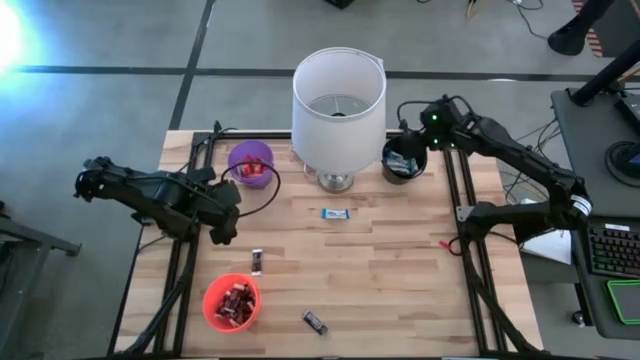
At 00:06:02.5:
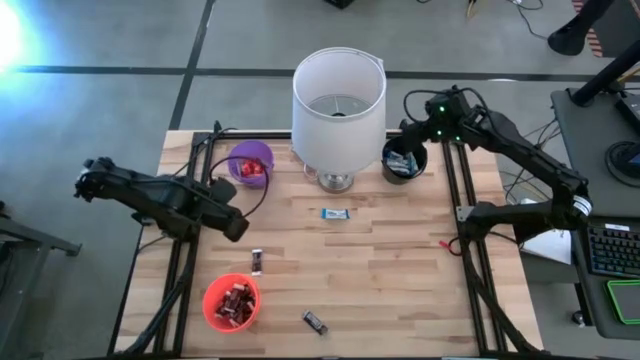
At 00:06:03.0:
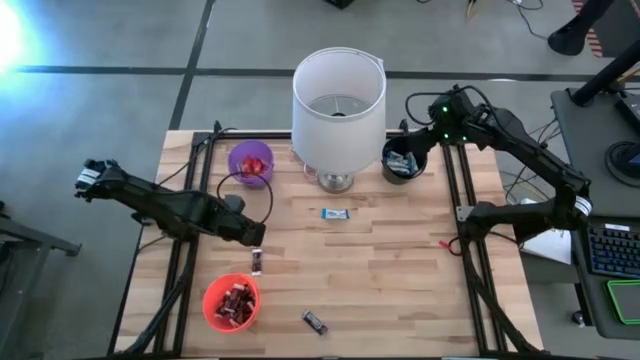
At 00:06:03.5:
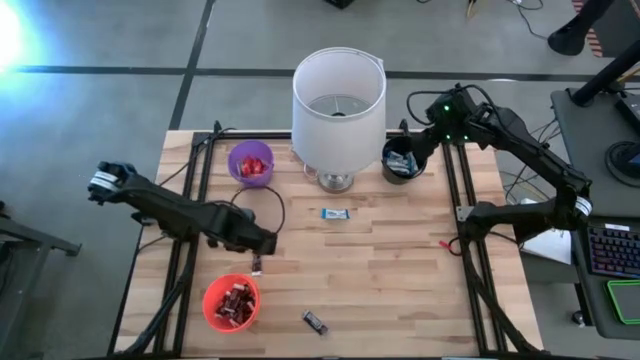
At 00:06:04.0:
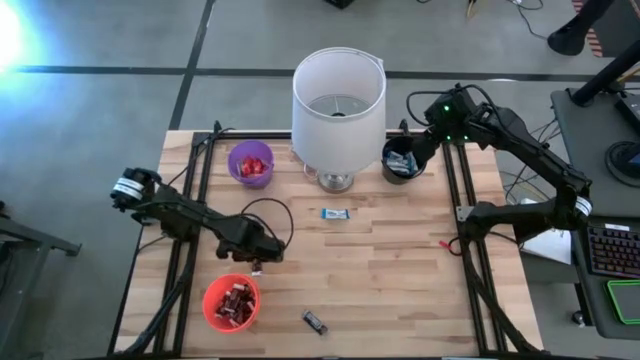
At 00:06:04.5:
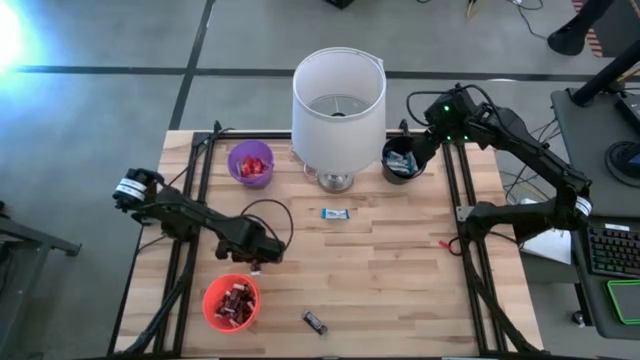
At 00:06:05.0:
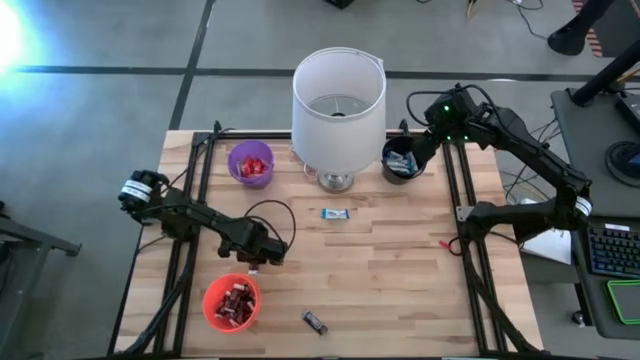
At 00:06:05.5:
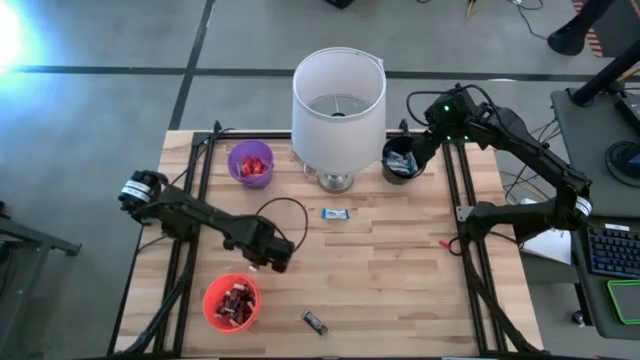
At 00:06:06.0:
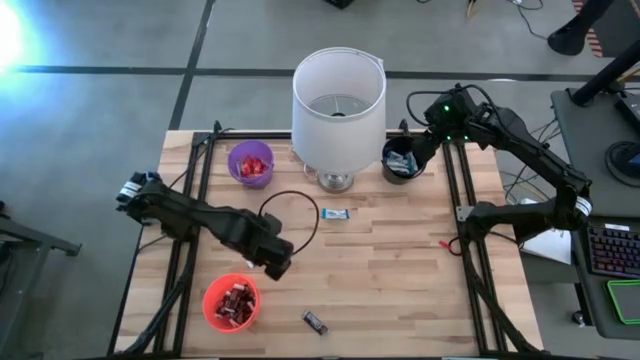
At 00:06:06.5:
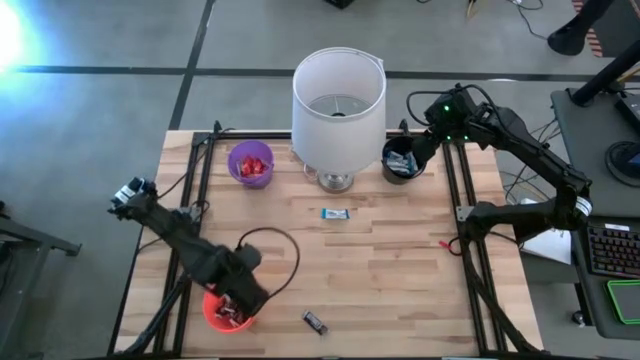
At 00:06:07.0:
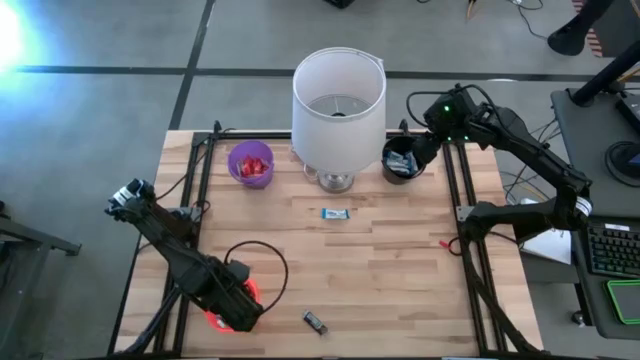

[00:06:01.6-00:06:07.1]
Task: Sort candy
Put the black chocolate into the orange bucket

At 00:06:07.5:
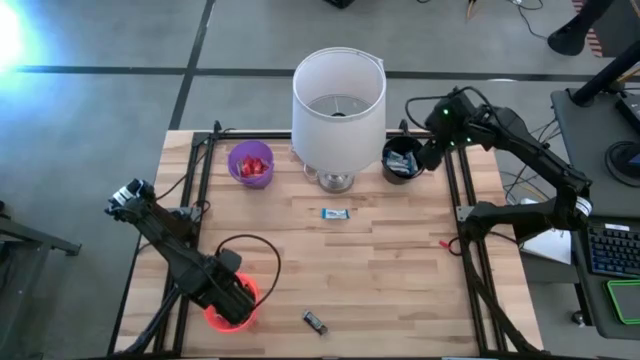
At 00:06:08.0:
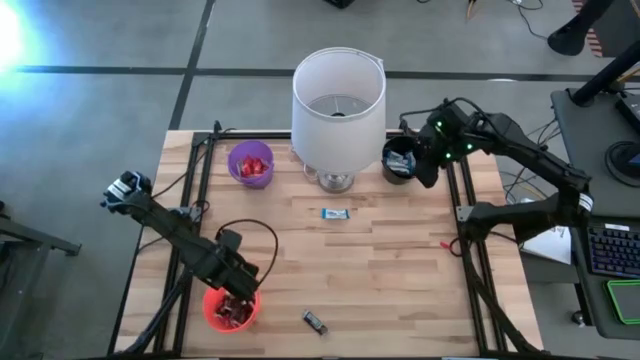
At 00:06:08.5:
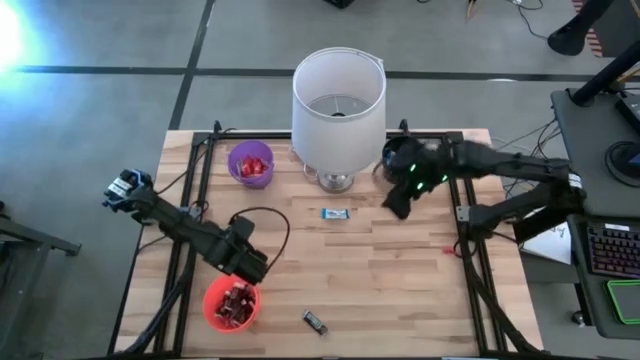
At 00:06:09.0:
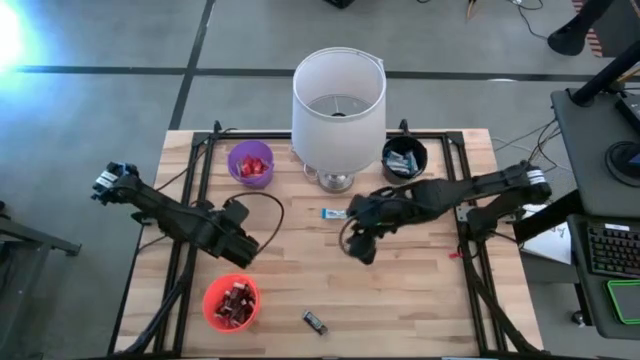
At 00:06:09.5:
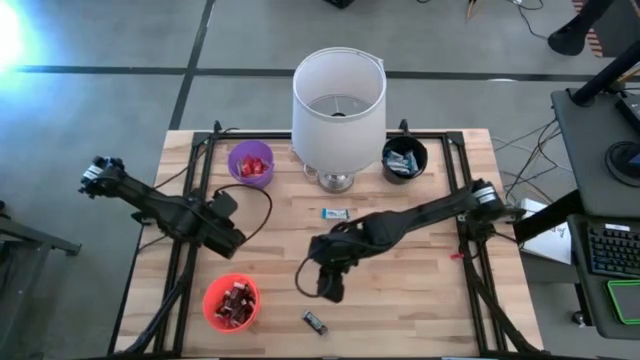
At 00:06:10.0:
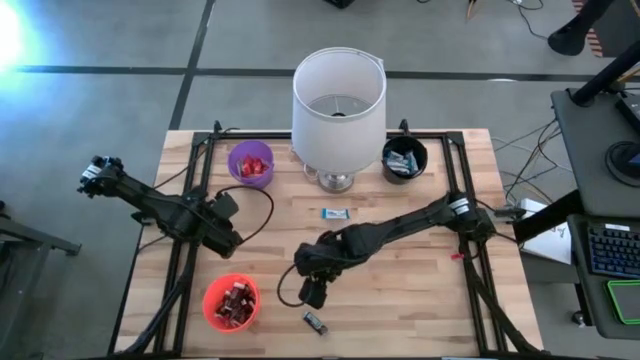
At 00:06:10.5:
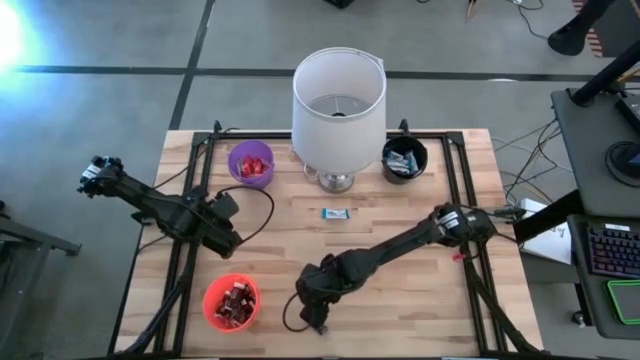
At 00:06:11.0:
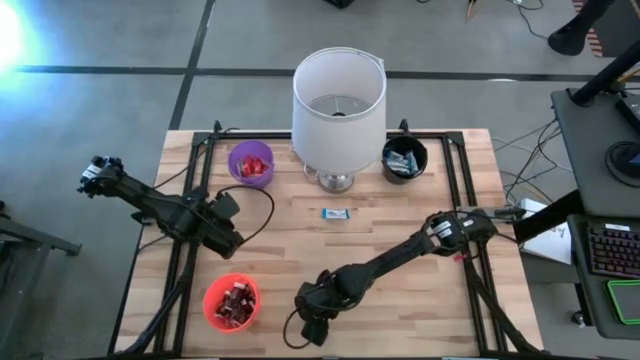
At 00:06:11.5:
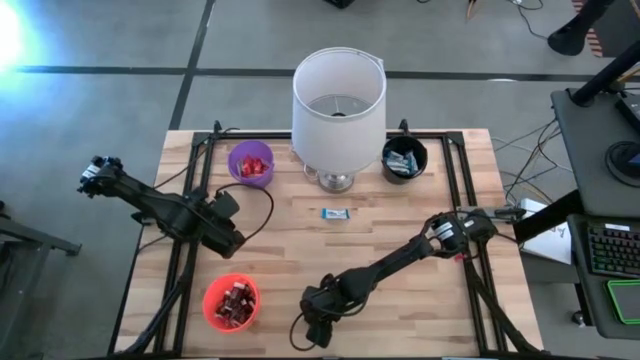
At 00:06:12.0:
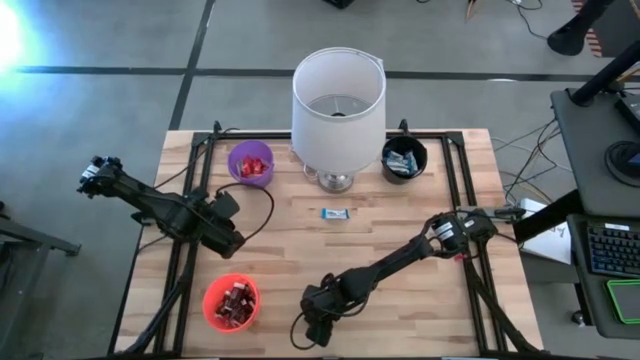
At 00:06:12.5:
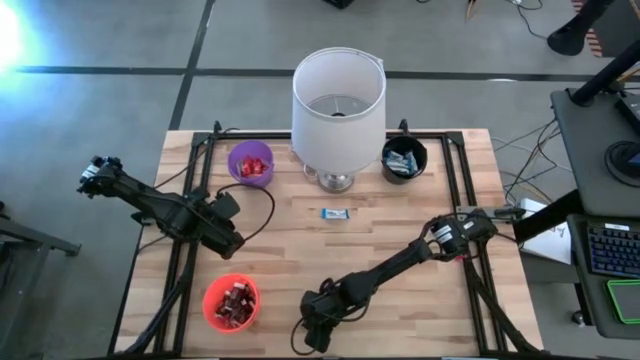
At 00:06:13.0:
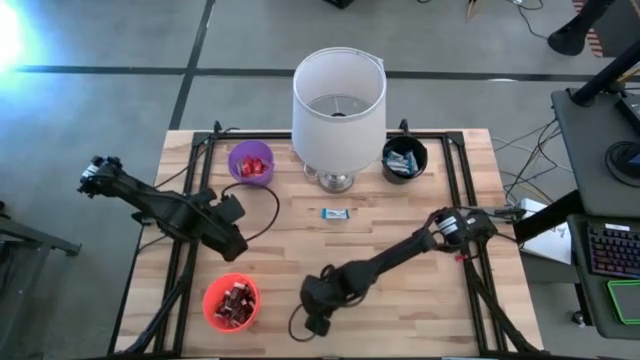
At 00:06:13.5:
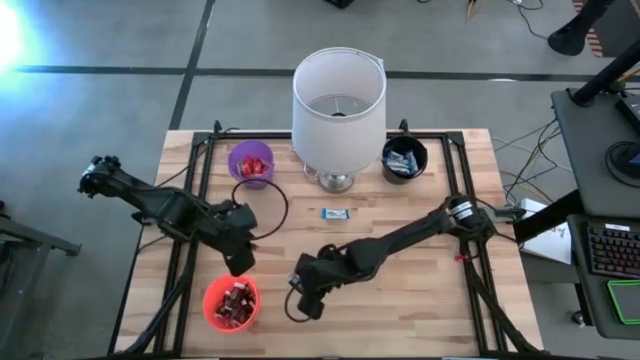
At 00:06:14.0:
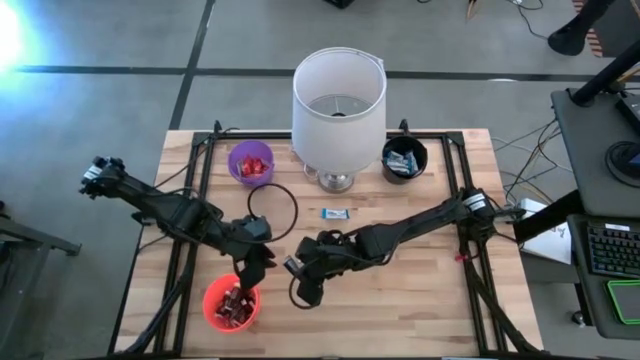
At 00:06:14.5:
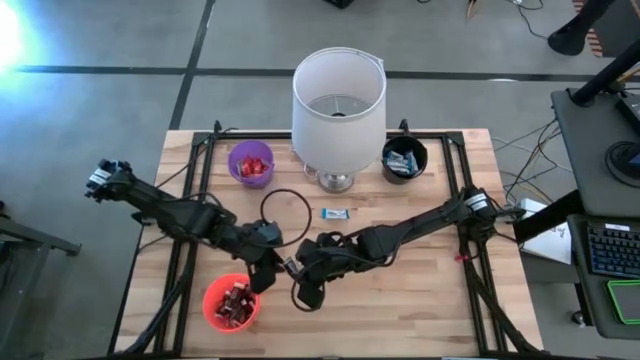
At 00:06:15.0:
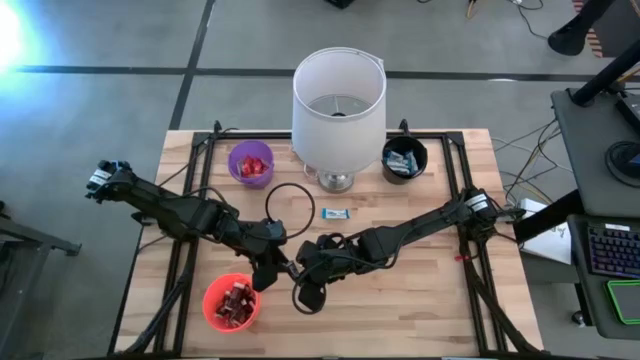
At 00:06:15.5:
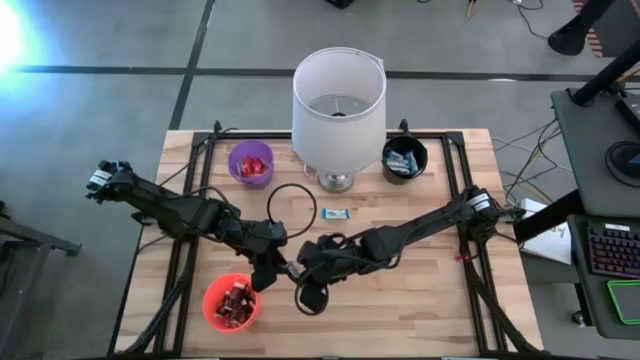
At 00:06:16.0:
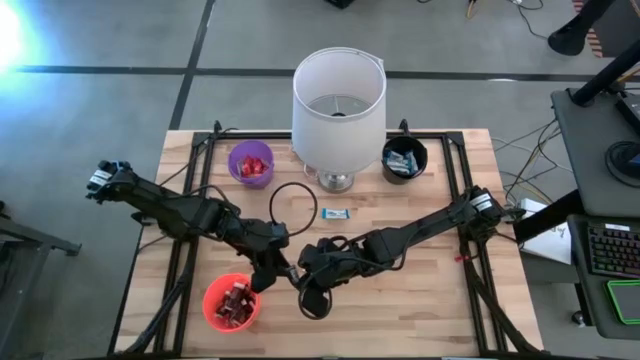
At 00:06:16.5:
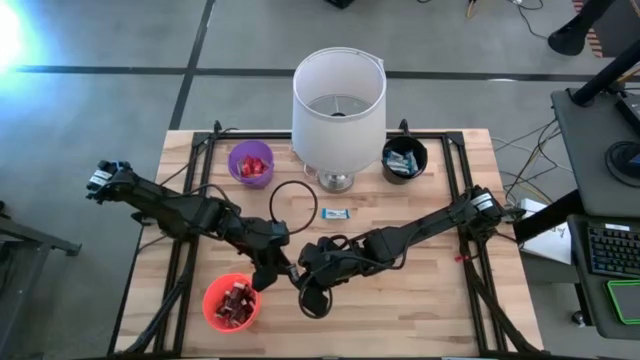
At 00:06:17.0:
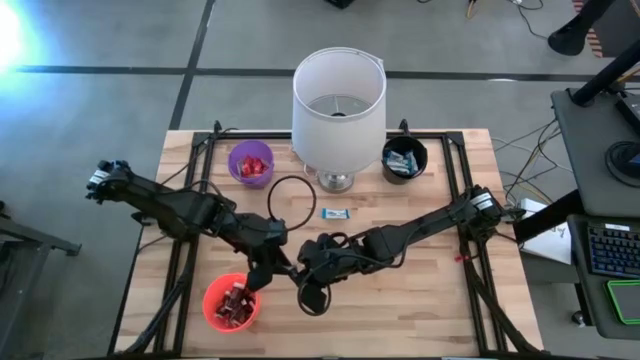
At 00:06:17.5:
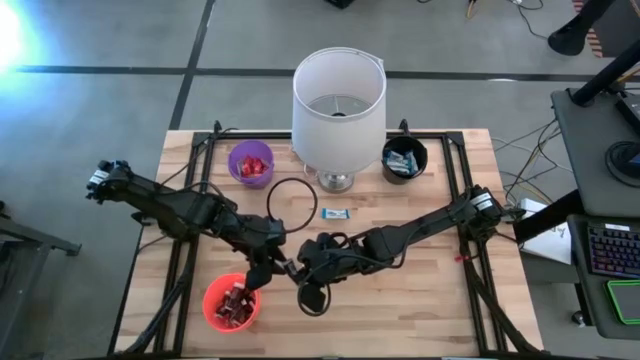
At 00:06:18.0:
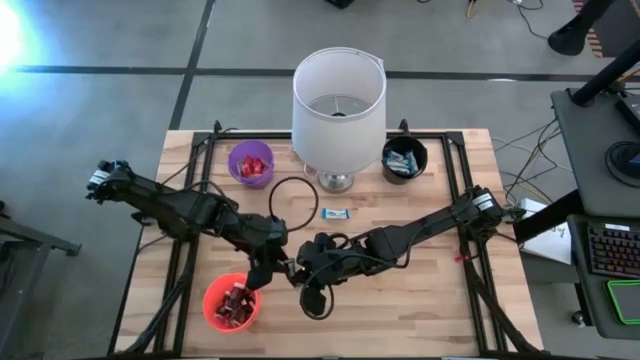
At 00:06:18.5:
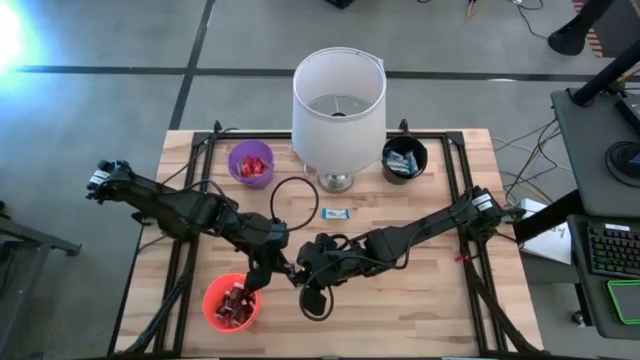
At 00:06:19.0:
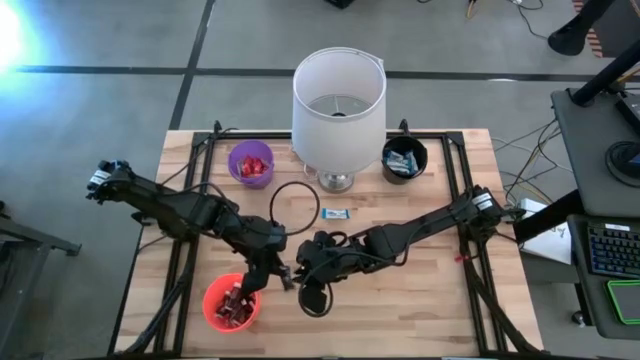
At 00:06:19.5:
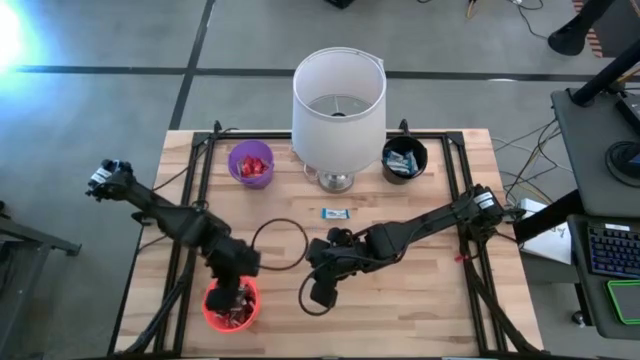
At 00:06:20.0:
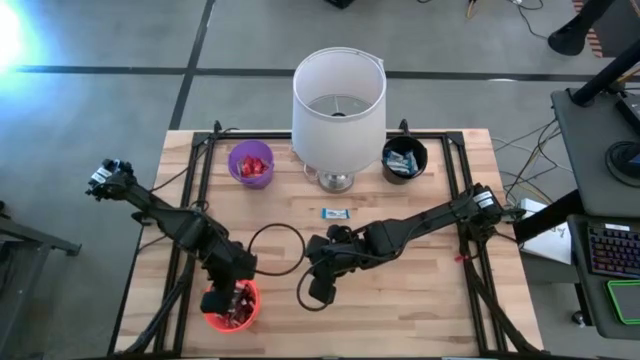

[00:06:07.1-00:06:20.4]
Put the black chocolate into the orange bucket

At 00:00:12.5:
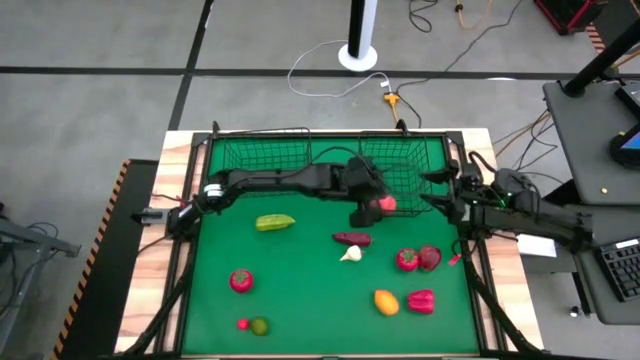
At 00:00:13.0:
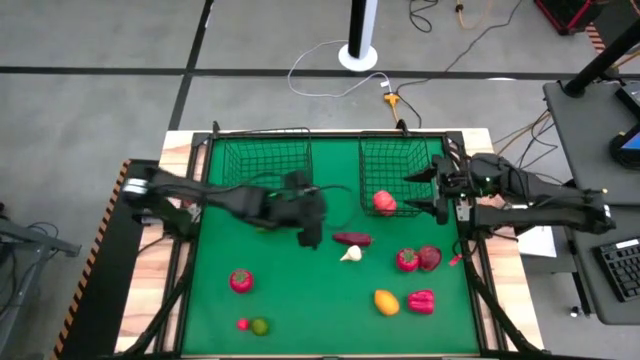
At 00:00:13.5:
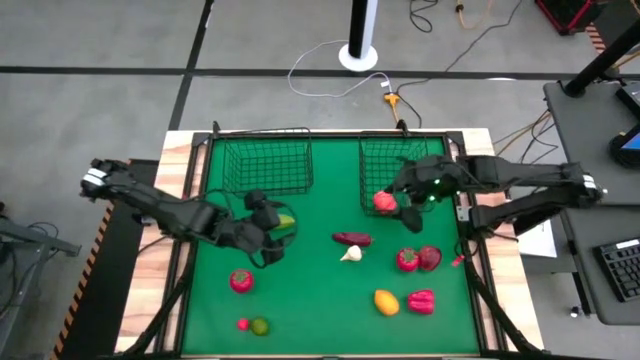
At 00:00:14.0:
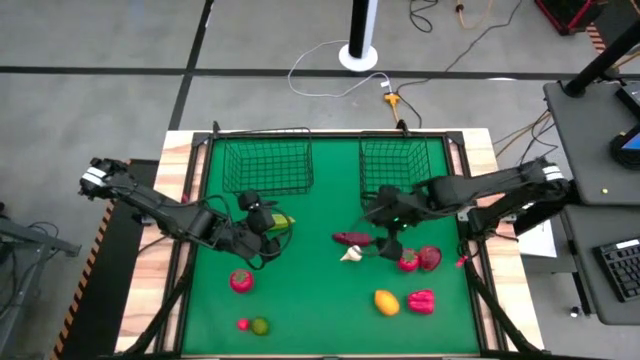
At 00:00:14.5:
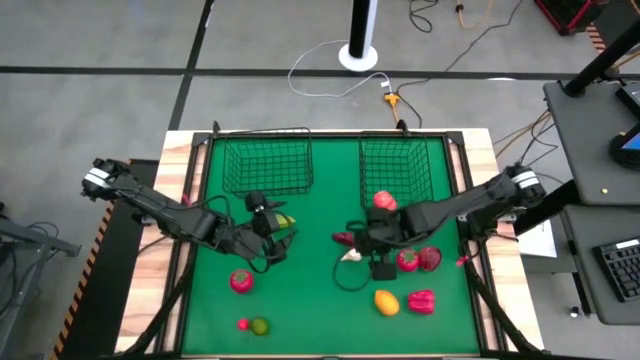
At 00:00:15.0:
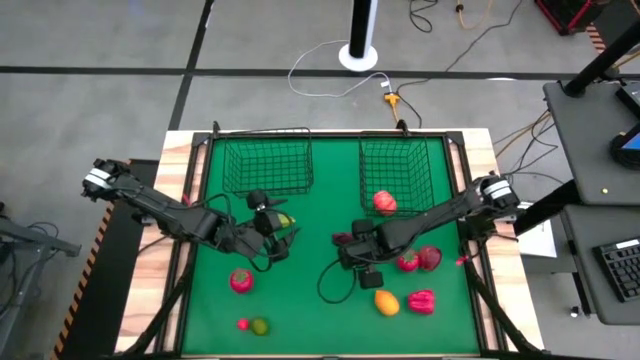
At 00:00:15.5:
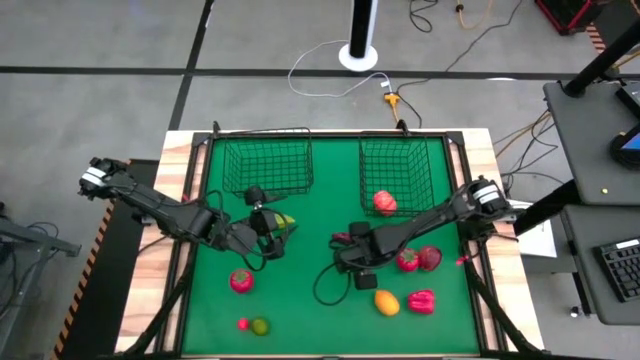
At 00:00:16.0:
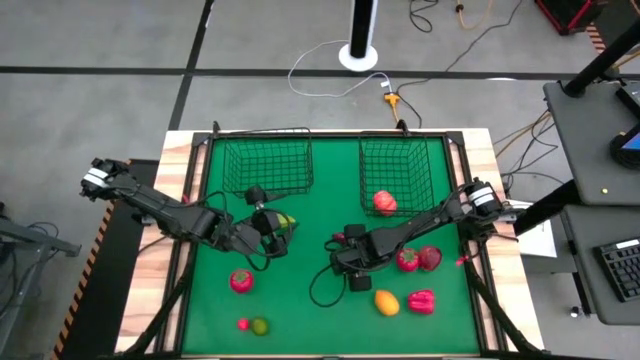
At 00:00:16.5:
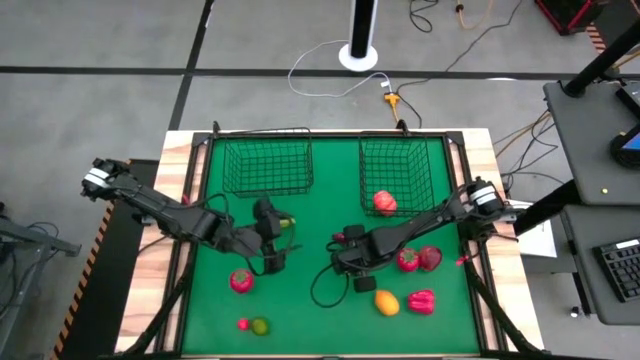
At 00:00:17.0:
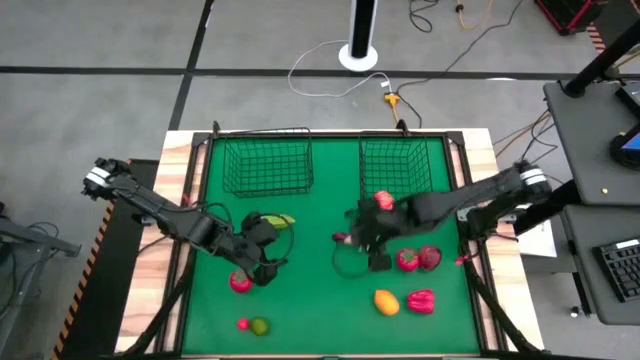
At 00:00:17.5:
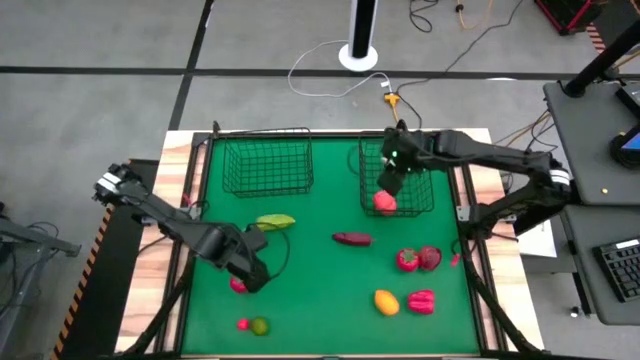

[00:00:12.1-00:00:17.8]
Task: Sort produce into baskets
Put the white garlic into the right wire basket
